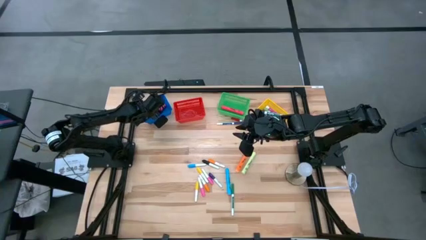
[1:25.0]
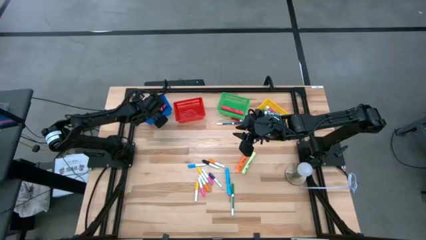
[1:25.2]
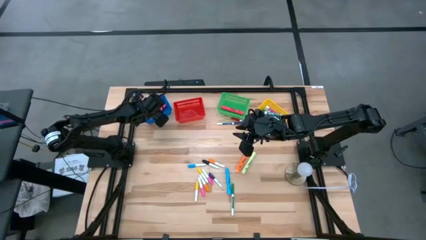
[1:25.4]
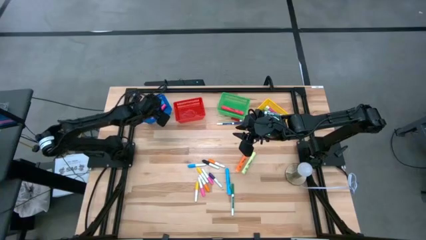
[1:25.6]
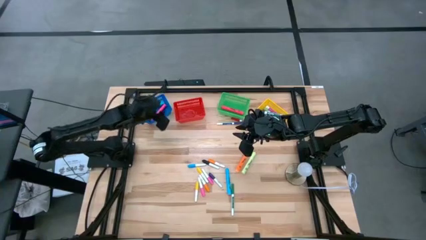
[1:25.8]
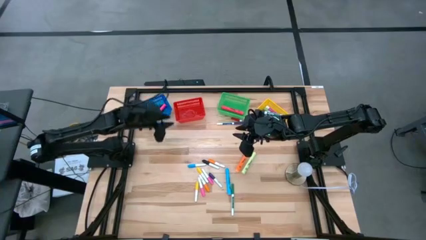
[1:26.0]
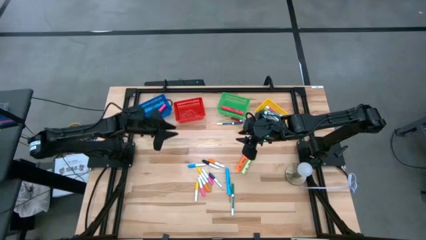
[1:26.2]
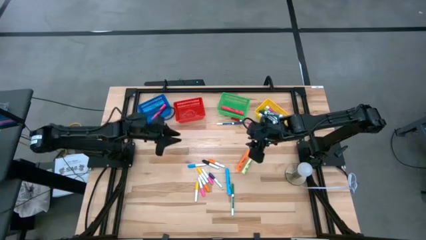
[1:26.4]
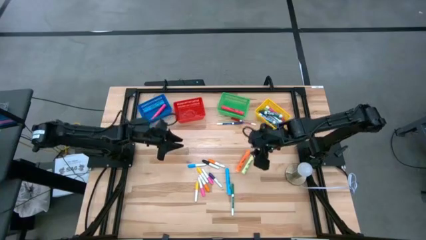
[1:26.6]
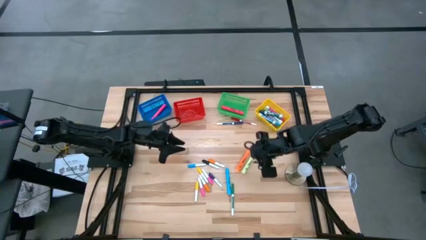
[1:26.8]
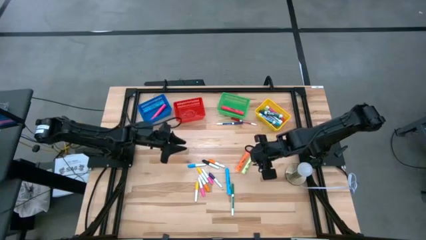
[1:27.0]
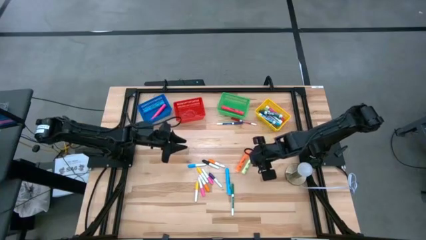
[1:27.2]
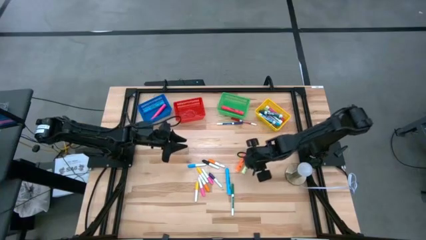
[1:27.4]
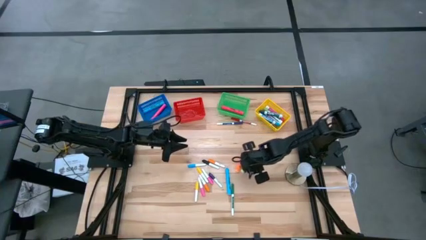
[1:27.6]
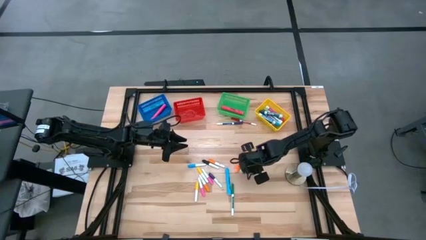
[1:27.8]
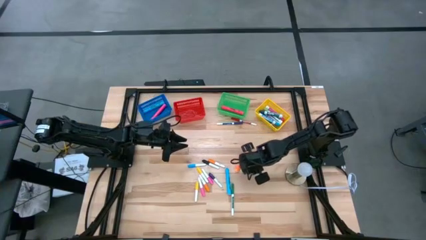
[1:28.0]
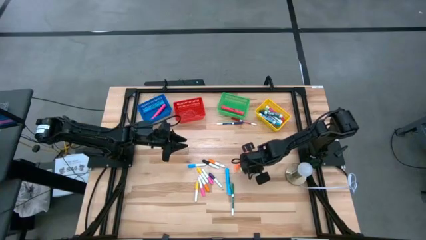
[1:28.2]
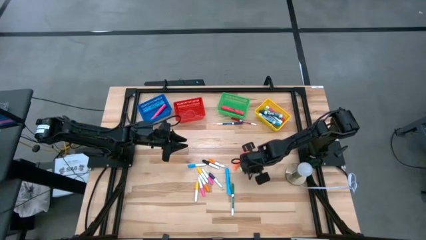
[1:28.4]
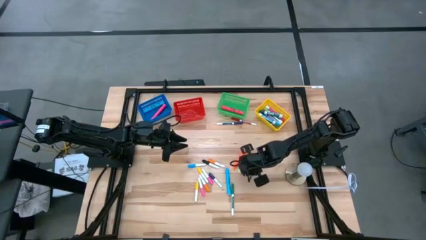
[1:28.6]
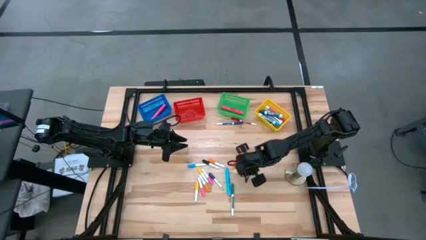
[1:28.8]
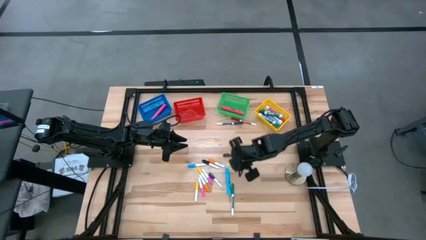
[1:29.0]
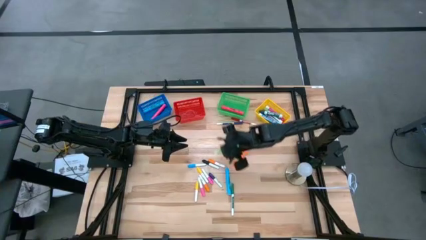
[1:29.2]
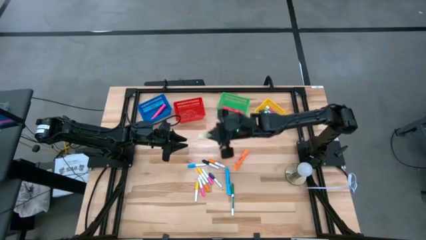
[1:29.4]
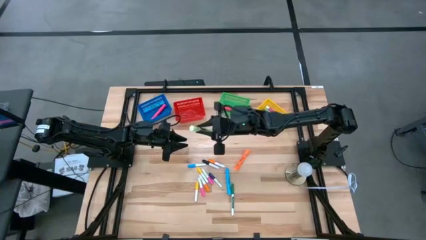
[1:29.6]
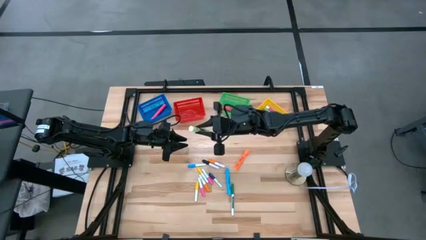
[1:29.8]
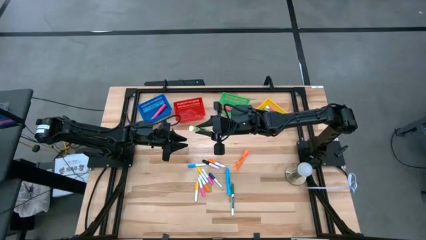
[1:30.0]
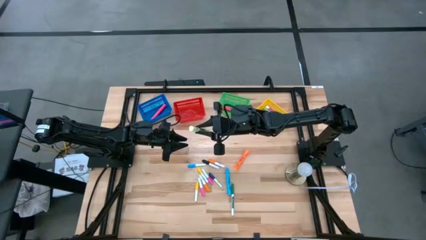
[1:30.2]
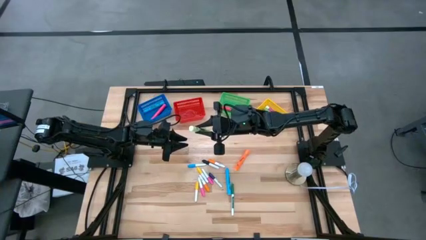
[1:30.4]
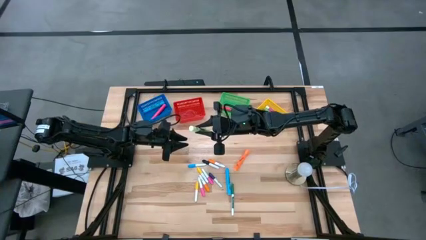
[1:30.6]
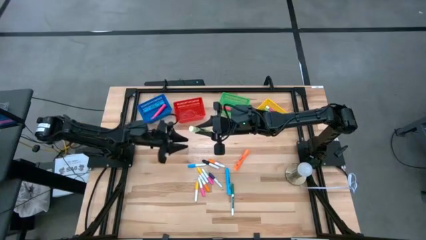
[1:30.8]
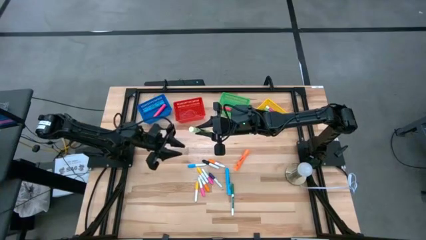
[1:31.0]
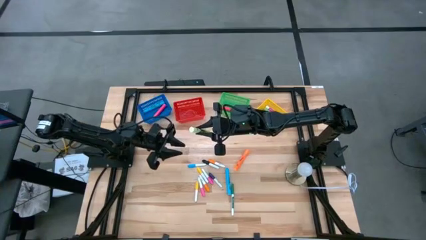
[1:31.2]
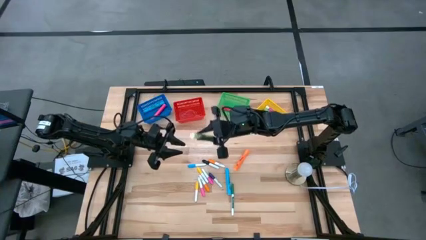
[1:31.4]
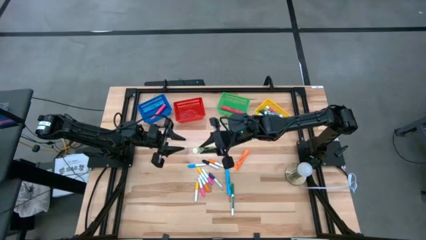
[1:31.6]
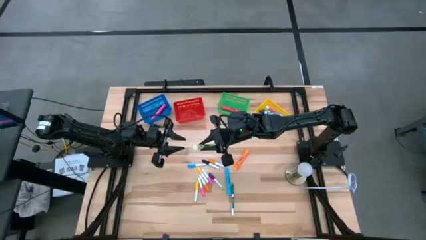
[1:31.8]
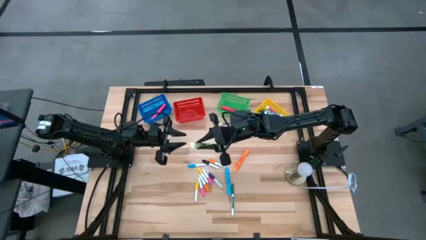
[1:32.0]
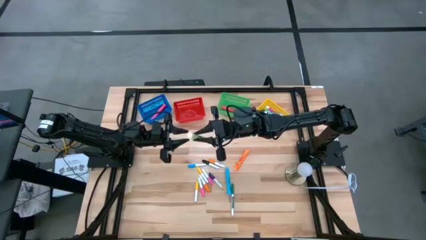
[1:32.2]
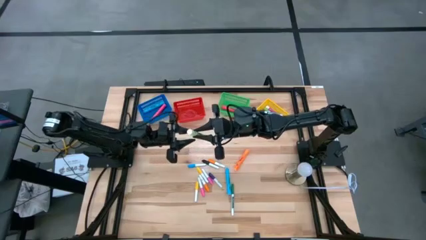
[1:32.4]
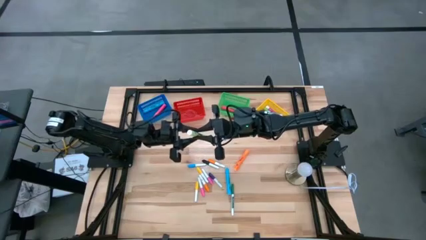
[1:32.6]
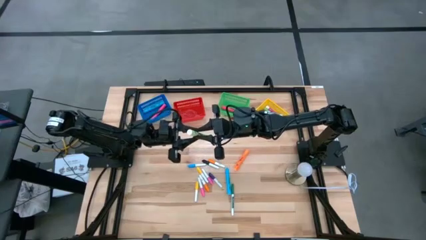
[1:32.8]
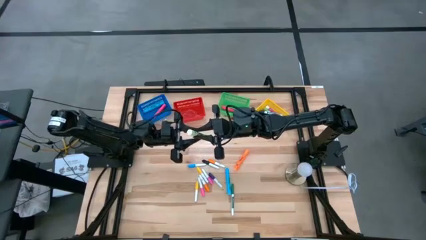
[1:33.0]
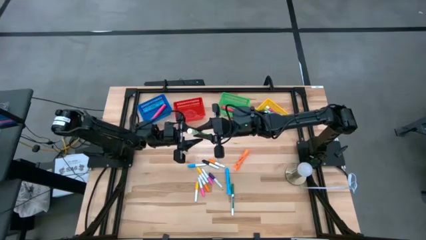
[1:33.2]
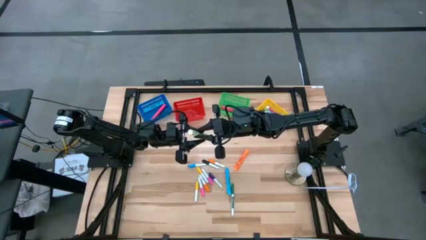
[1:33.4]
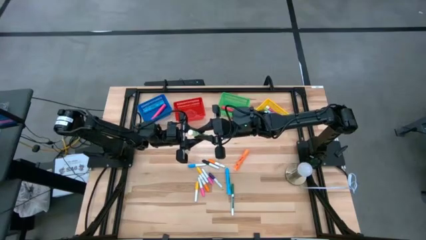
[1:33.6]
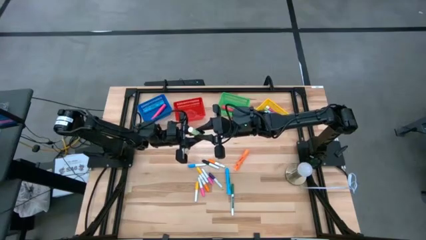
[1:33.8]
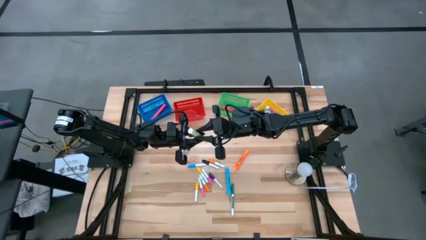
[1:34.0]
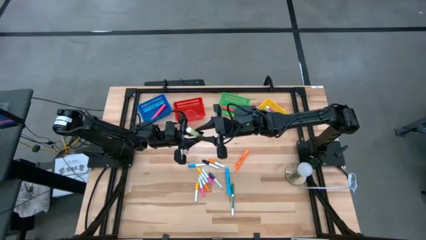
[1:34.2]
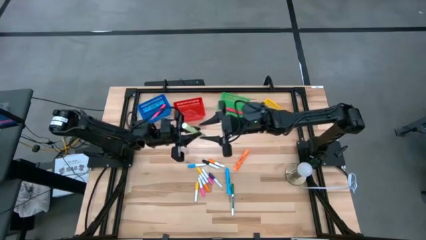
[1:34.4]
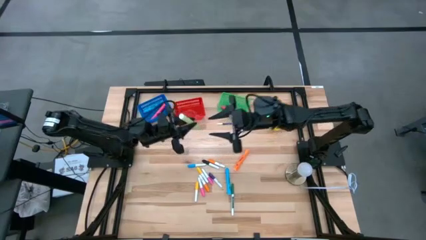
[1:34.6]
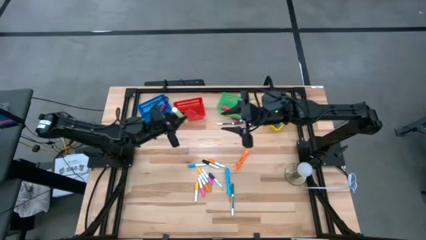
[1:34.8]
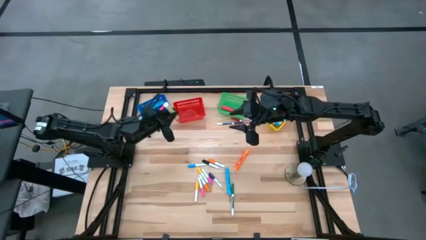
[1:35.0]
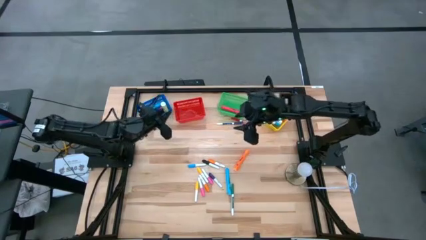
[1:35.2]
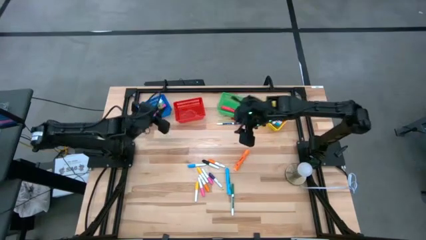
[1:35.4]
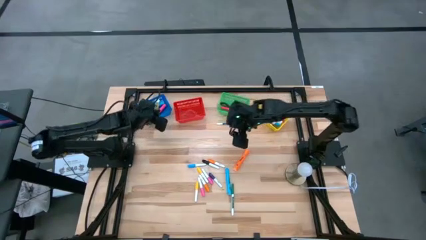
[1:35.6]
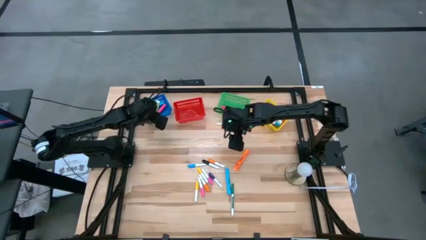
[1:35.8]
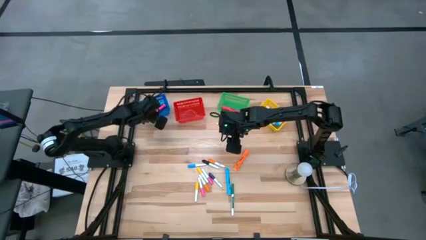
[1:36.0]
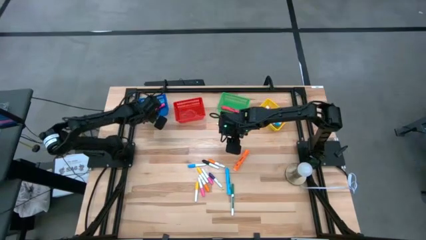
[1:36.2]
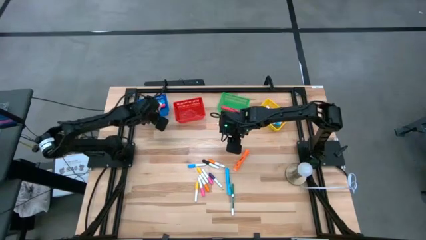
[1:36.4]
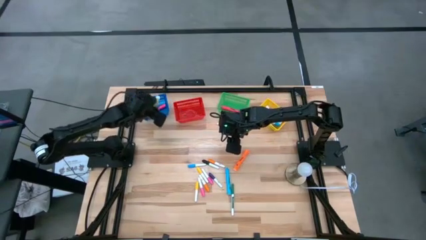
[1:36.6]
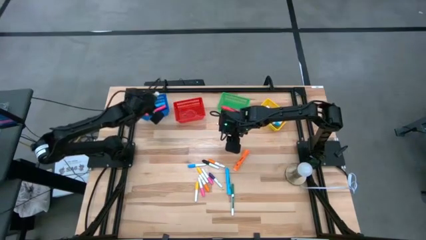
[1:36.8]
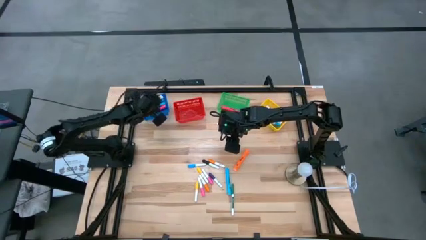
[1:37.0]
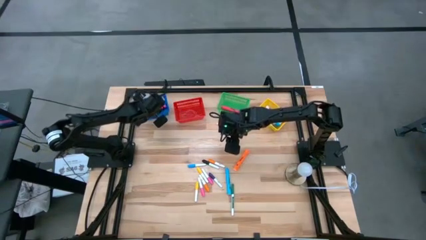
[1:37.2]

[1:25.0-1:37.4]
Task: Pick & Place Markers
Put the large green highlighter pen into the blue bin

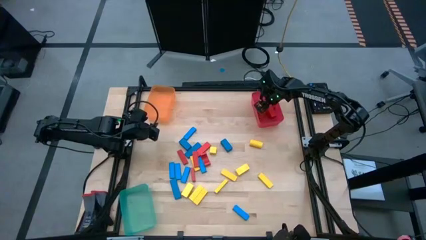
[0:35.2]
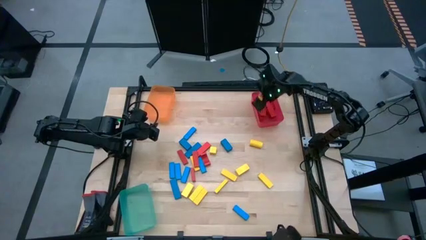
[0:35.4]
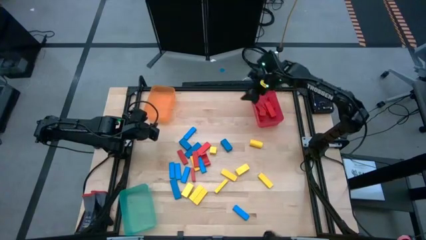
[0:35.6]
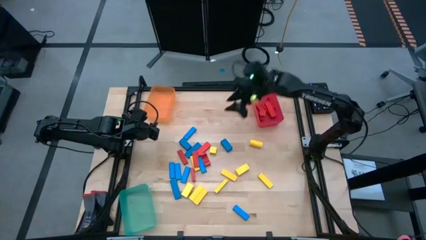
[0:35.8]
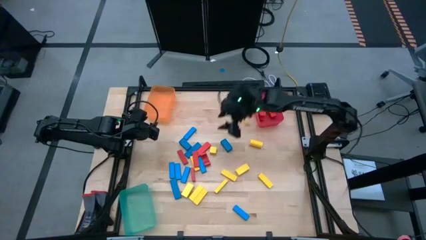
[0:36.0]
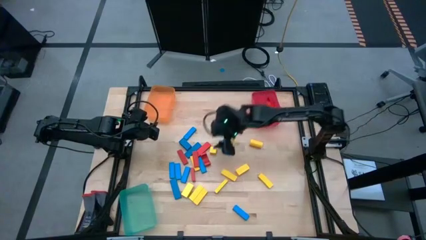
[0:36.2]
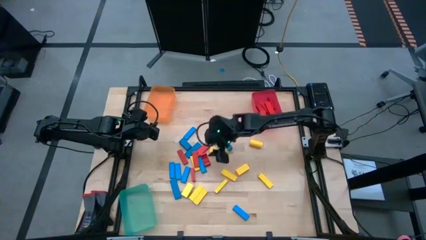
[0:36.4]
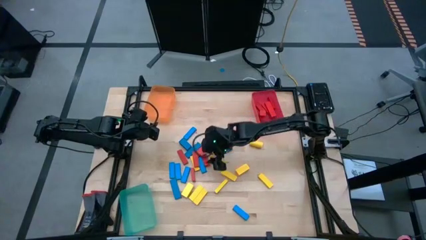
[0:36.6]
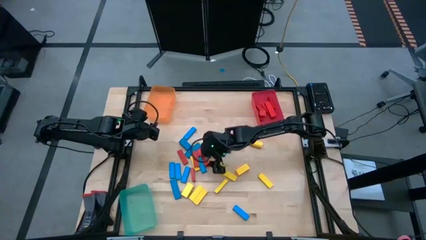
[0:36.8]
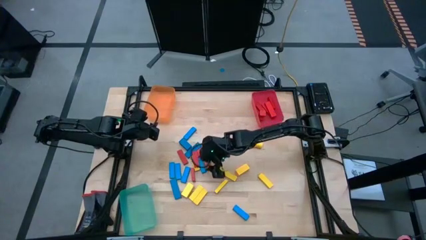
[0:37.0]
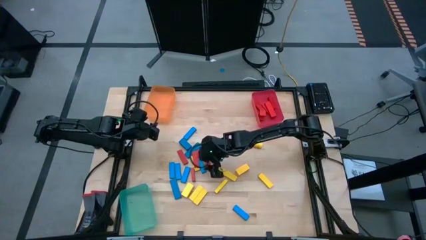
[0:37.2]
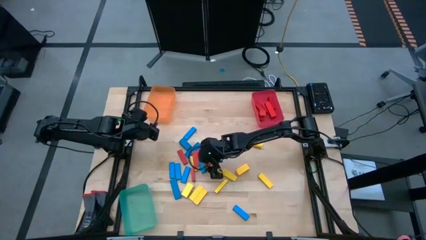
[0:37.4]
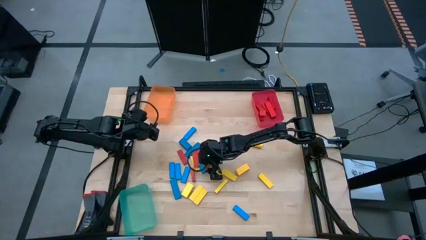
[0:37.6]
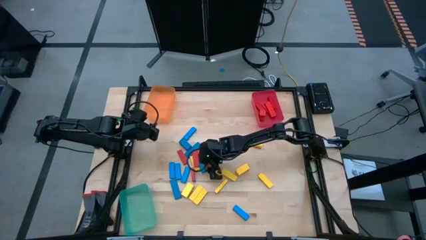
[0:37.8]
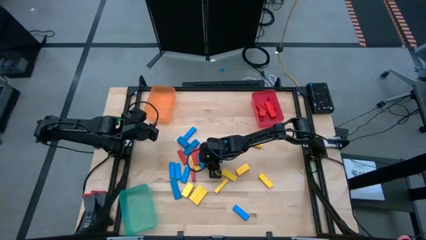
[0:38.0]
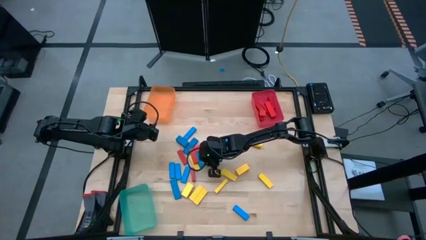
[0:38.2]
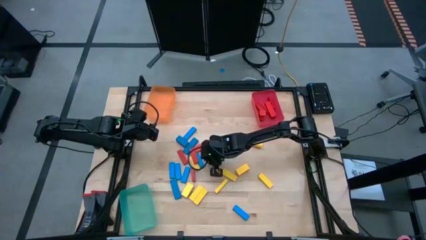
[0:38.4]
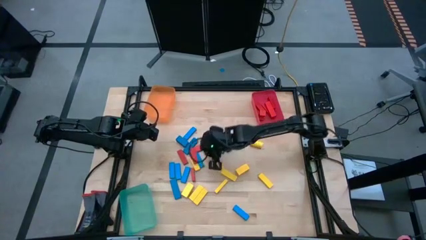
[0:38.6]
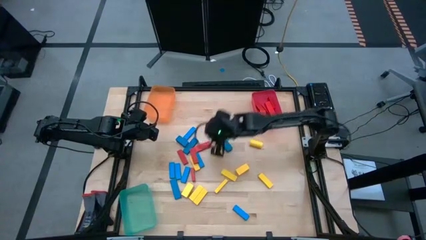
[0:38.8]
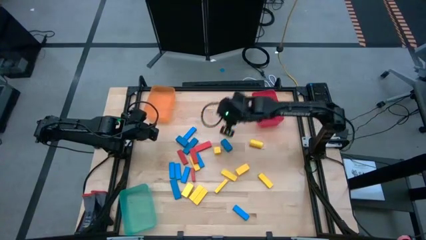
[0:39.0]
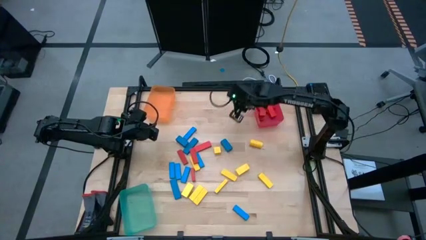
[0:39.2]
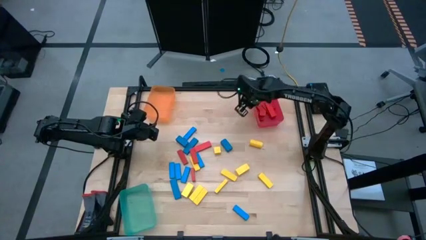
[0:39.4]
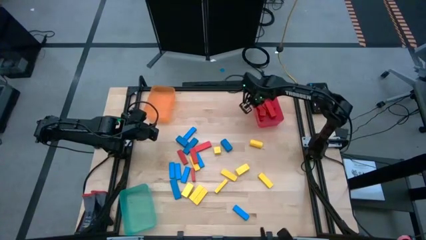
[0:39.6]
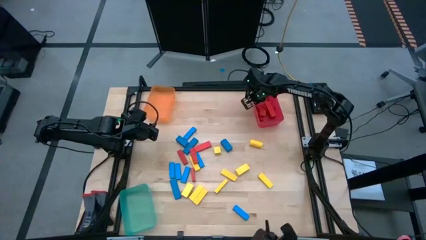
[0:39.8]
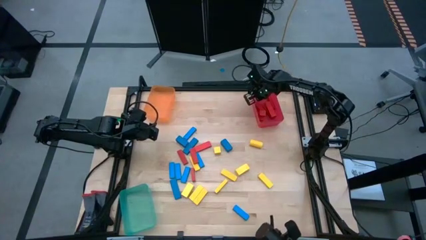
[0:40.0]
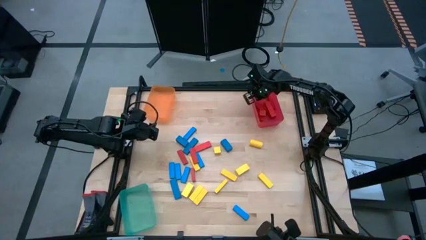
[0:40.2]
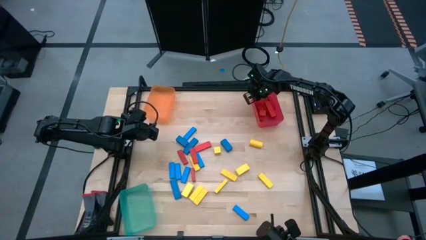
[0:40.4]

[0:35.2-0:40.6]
Task: Sort blocks
Put the red block into the red transparent bin
